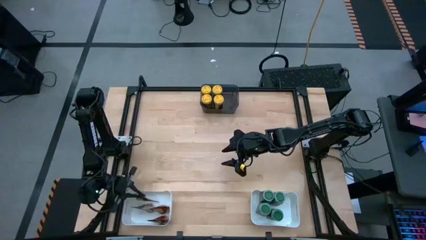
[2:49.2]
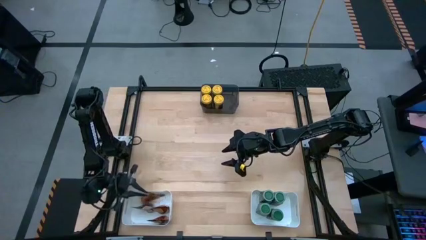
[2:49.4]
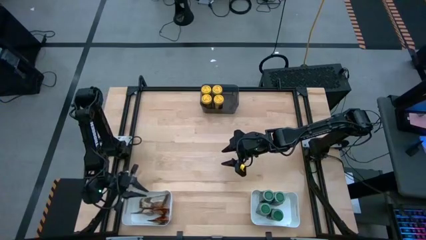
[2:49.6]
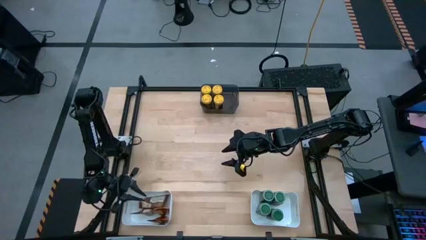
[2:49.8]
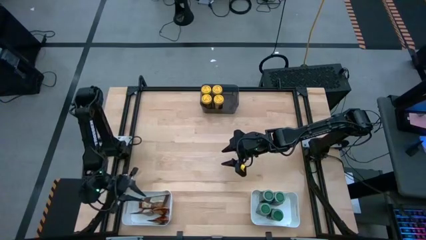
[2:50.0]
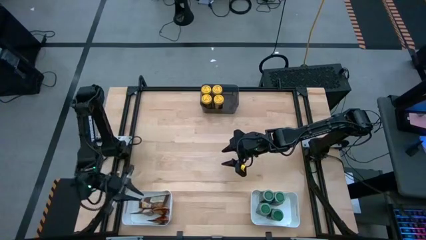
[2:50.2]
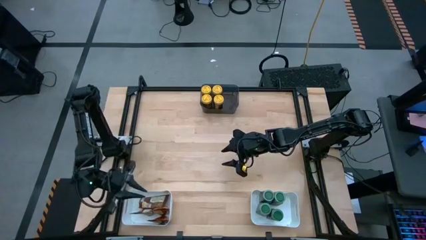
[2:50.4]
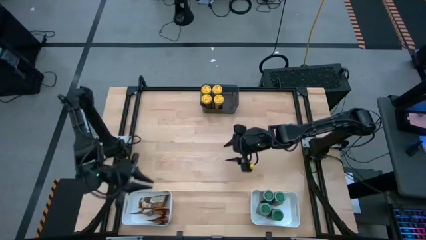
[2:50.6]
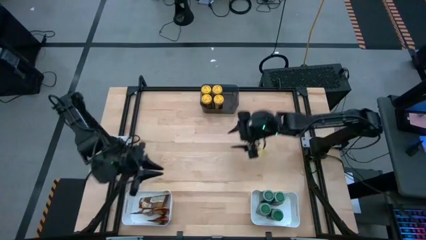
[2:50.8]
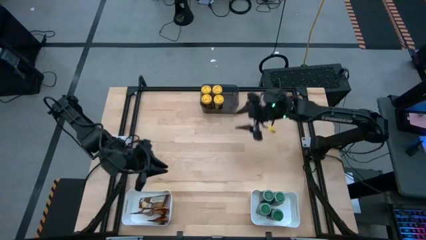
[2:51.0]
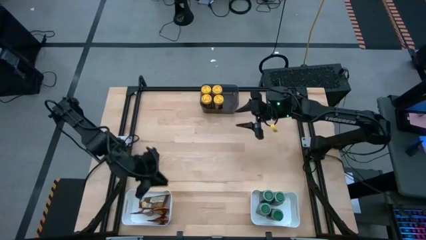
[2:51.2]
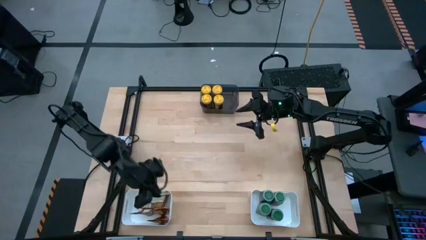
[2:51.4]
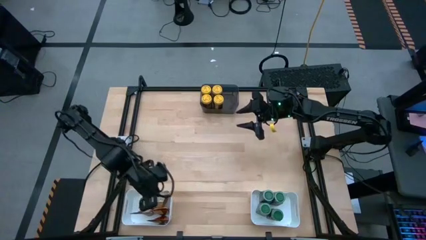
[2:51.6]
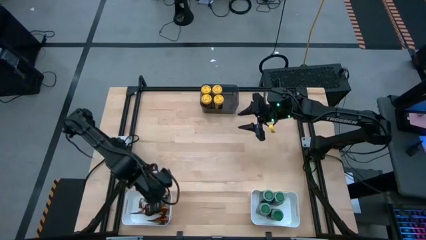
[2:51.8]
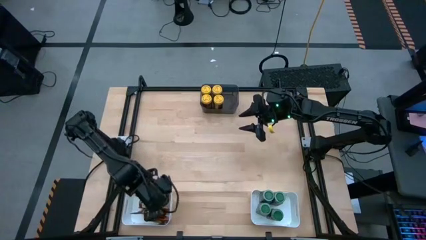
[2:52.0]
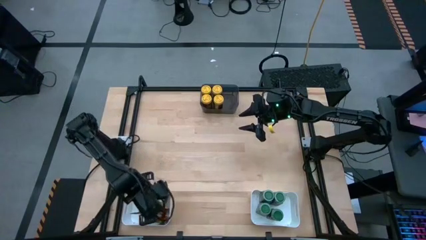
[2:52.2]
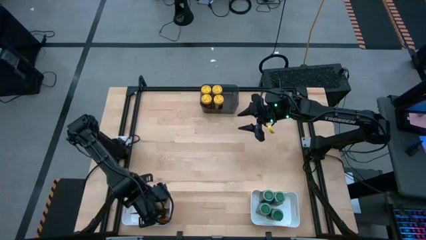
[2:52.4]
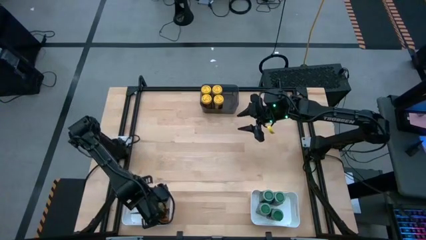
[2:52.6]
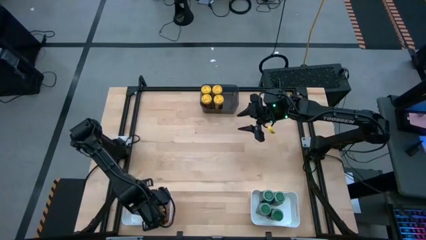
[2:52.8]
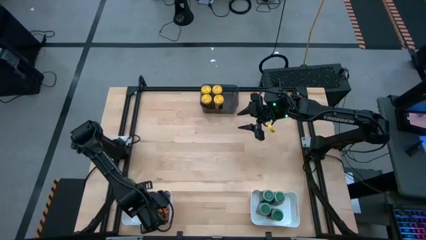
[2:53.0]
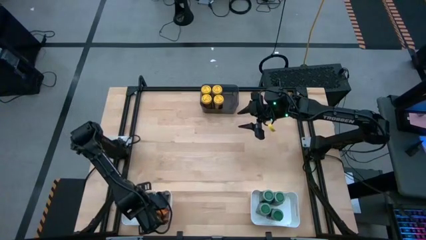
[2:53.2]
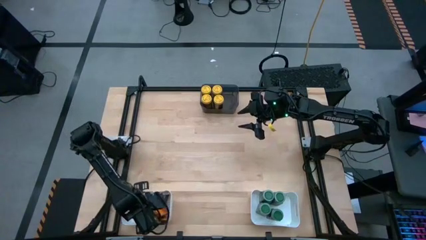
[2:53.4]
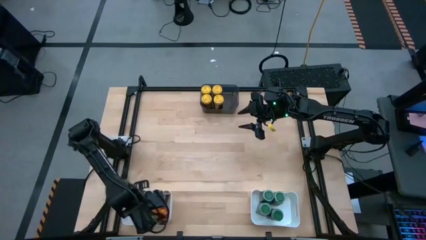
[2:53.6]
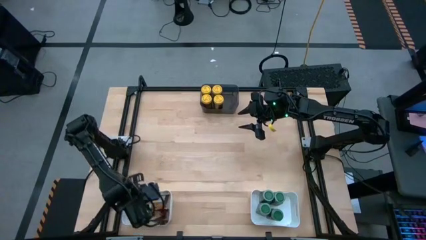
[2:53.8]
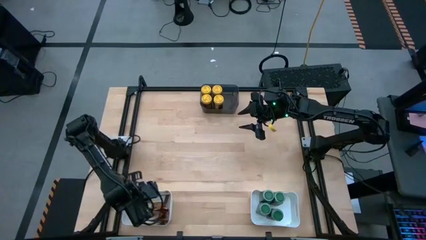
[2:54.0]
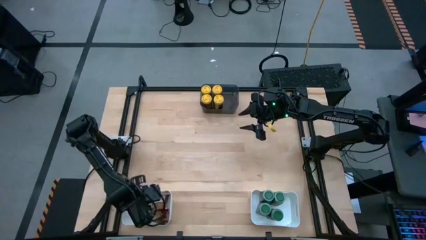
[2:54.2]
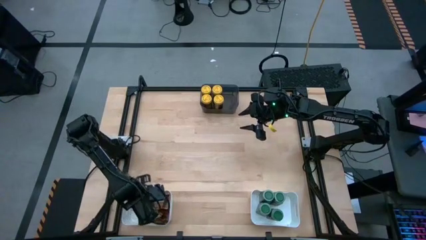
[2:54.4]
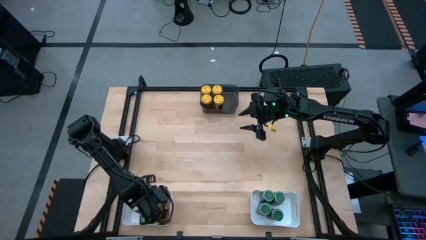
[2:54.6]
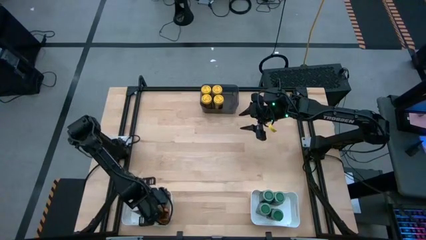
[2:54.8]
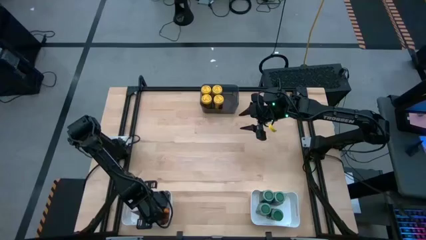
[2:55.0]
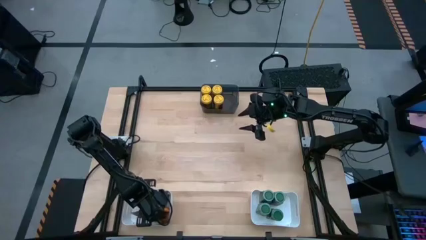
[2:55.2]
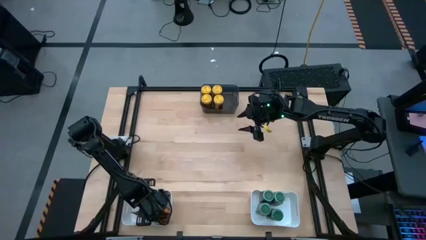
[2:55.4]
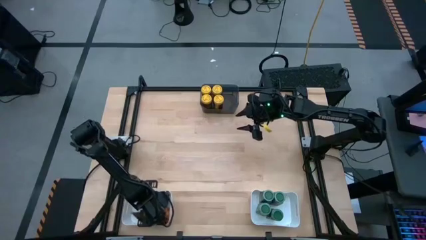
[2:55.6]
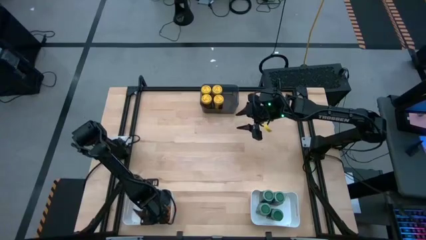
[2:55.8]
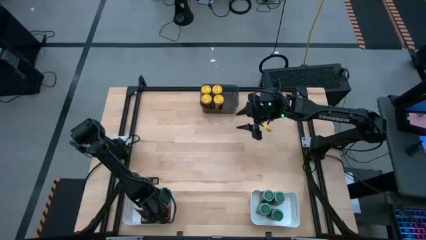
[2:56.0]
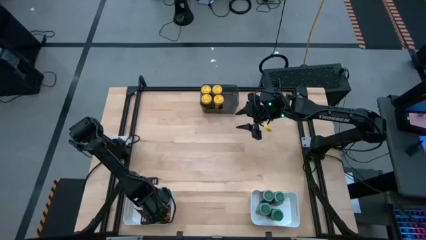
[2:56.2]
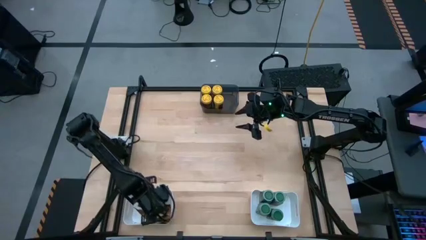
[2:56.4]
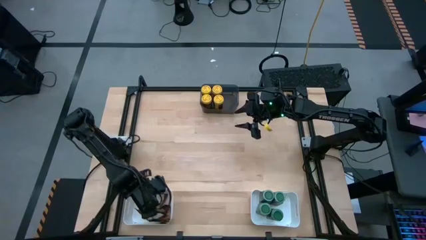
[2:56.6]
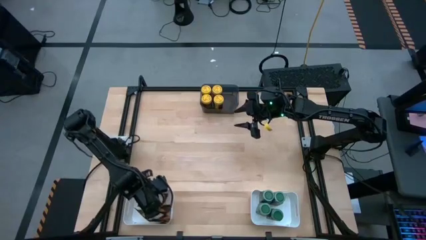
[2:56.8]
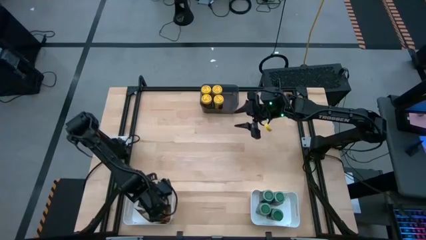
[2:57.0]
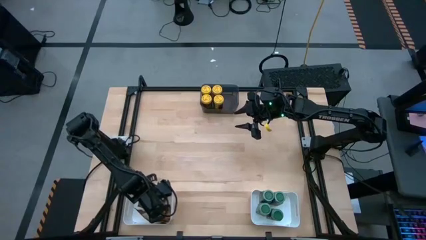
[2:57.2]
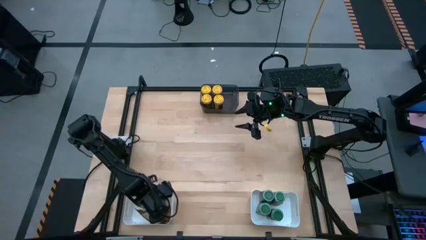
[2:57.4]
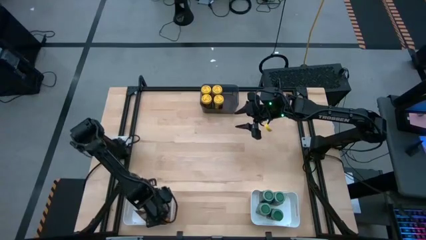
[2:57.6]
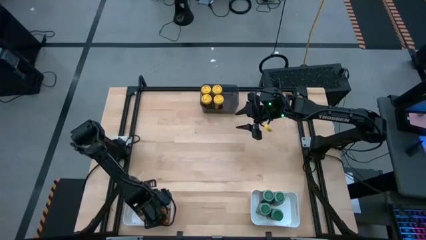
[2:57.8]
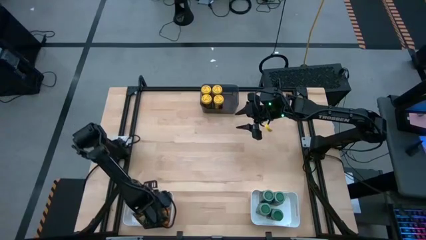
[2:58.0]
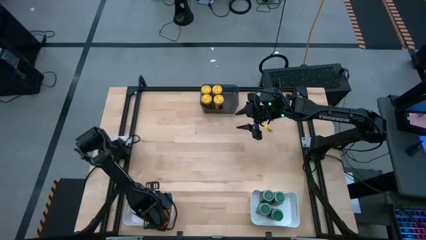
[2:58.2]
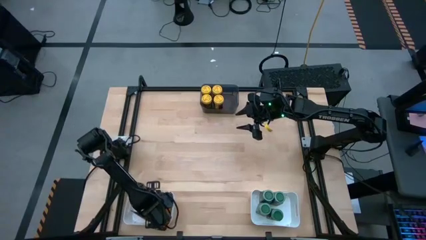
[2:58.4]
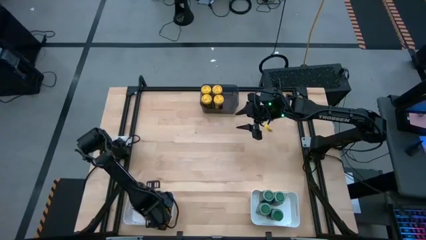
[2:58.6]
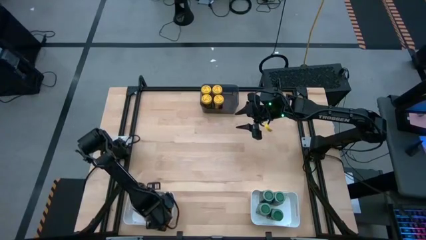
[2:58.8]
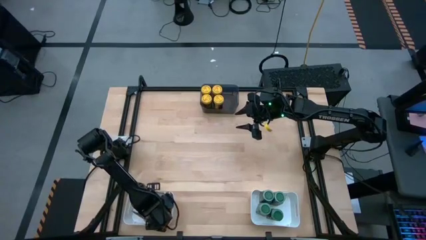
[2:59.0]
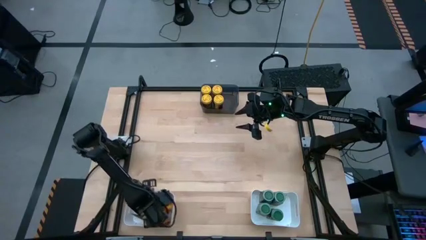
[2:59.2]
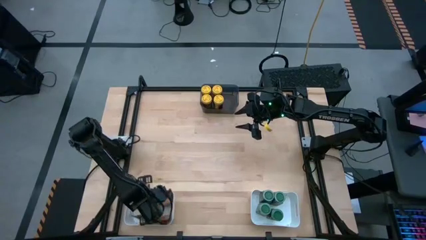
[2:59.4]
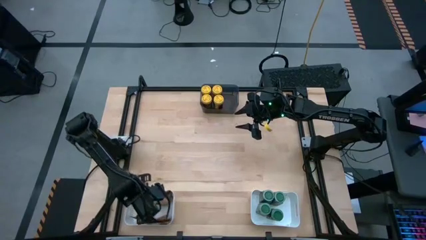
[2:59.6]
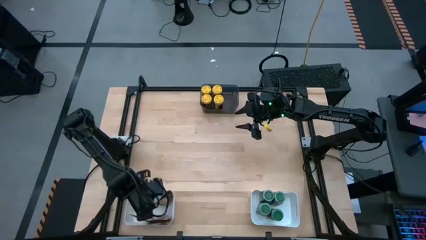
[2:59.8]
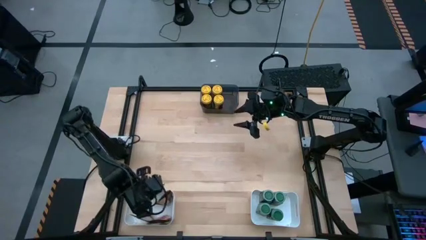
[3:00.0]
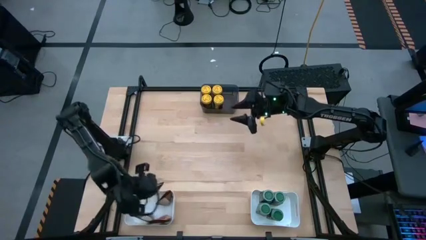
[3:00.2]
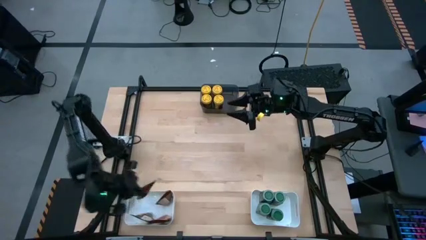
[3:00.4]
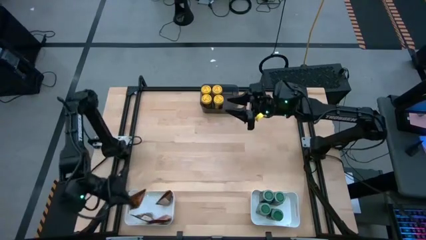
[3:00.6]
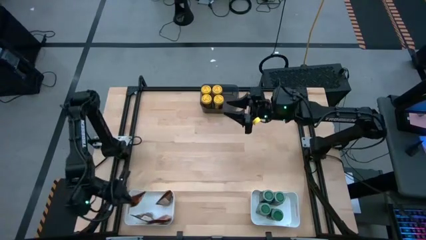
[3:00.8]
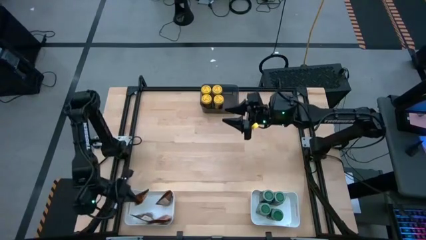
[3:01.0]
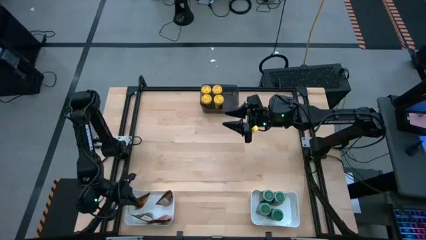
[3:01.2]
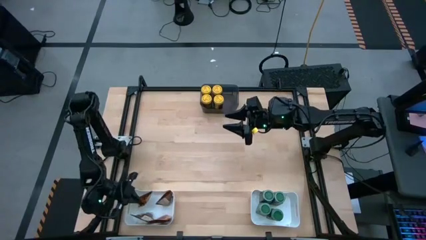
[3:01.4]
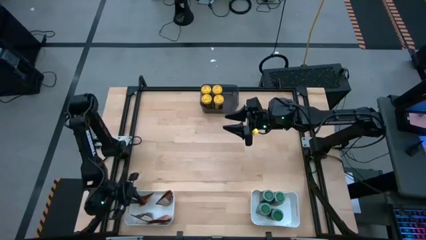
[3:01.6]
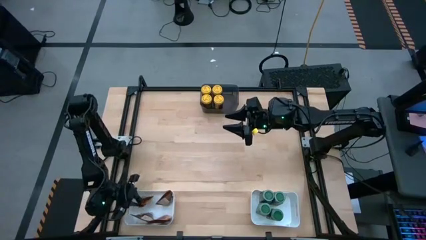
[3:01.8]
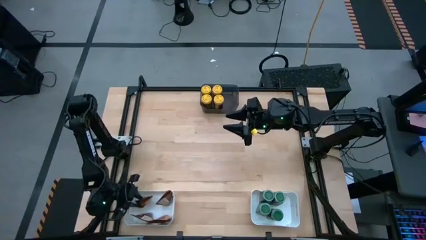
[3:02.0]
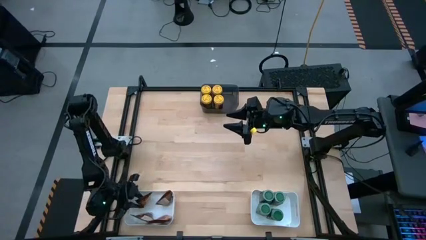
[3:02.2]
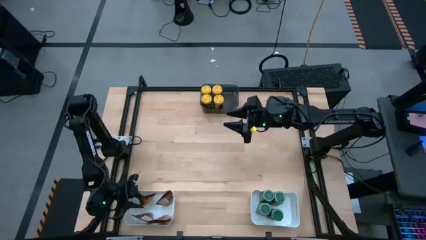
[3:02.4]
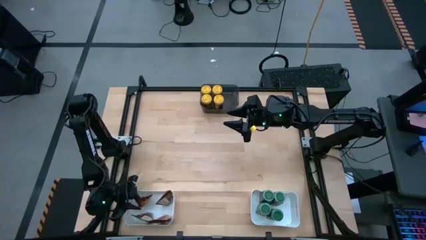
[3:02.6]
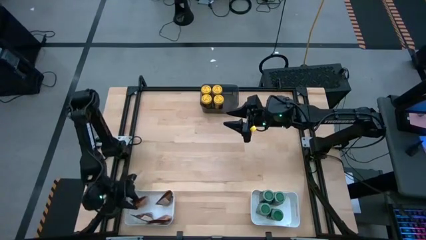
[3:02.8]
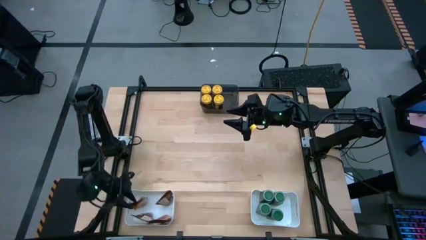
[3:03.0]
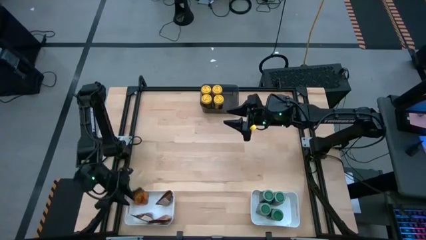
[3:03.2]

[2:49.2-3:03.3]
Task: Sort spices by type
Put the orange seasoning pack into the left white bin

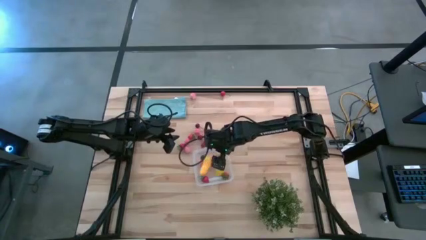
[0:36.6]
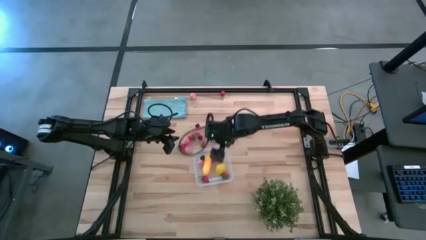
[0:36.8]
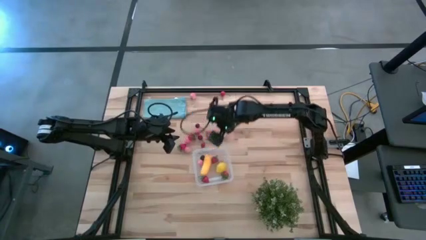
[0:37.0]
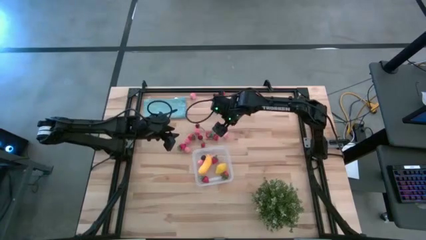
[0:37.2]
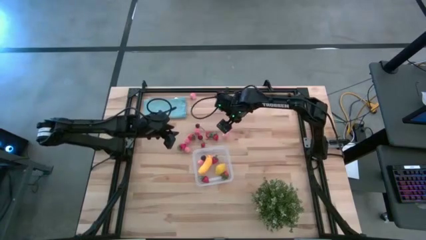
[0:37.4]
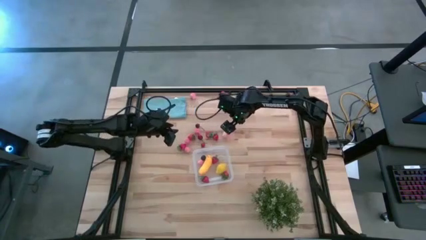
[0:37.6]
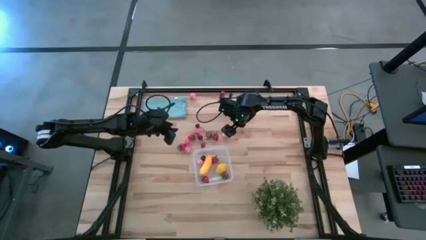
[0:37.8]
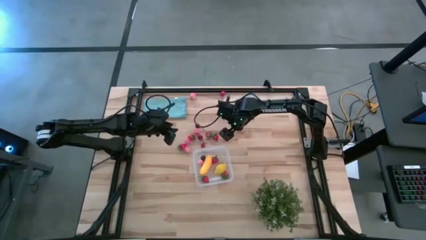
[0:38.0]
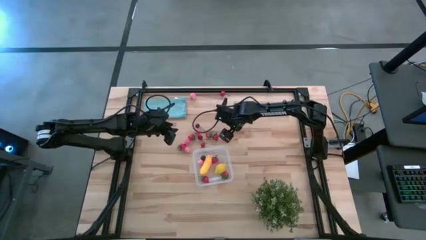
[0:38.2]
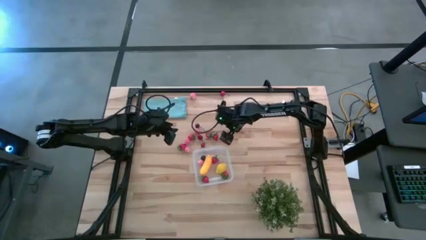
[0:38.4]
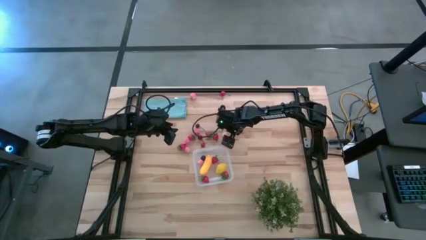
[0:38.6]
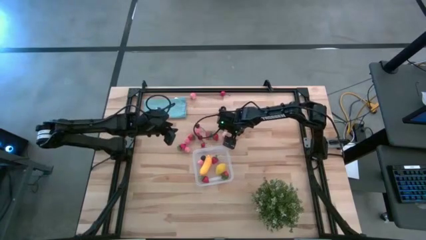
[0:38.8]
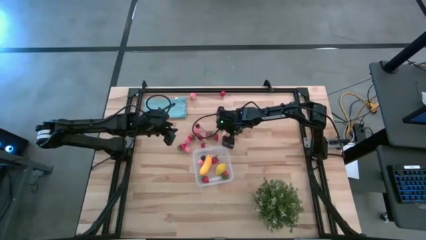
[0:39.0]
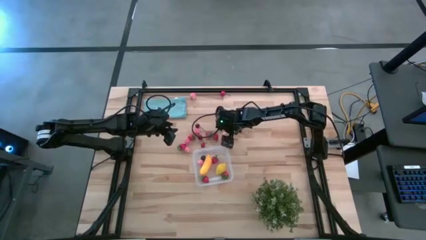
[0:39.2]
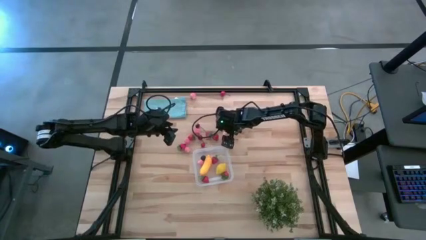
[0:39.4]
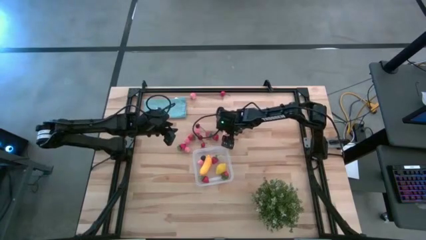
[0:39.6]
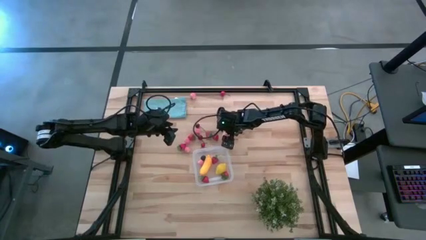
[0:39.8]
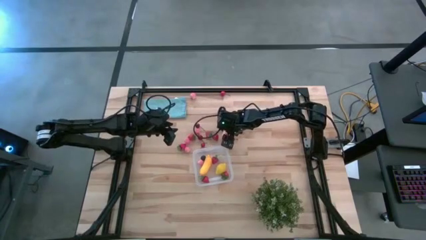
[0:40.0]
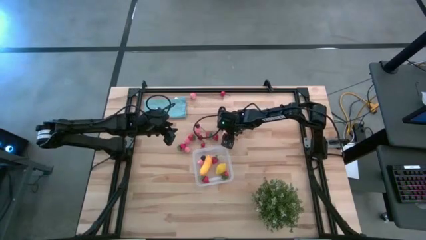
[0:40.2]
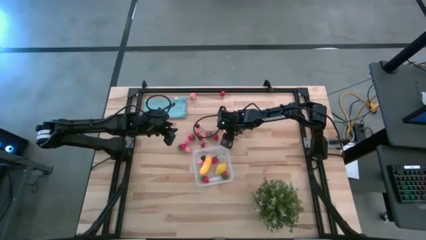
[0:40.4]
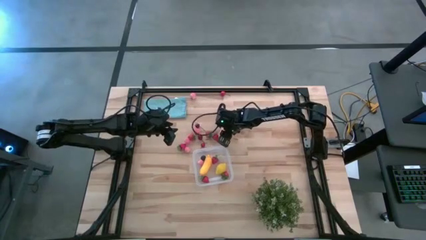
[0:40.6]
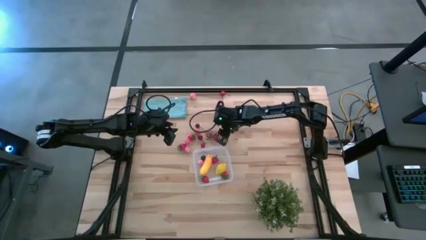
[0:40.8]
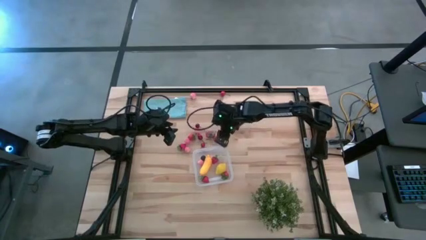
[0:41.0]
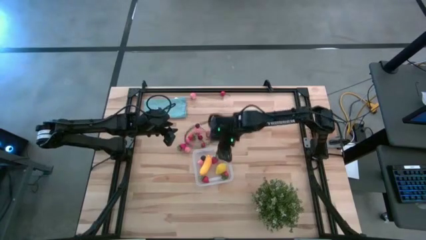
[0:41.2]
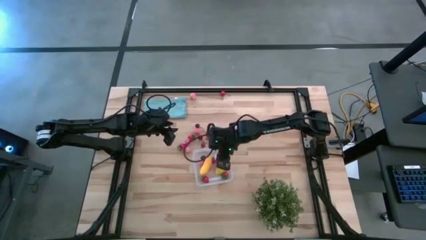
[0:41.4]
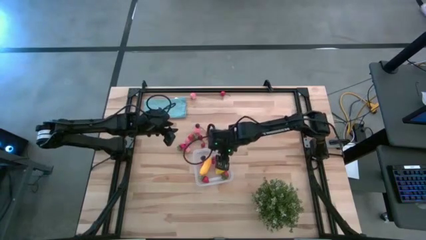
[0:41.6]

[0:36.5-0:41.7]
Task: Pick and placing Produce into tupperware
Put the pink peach into the transparent bin
